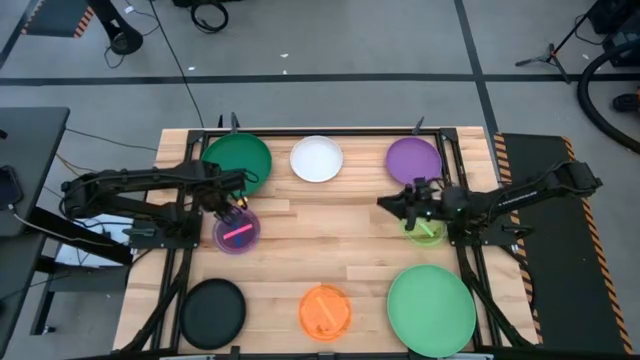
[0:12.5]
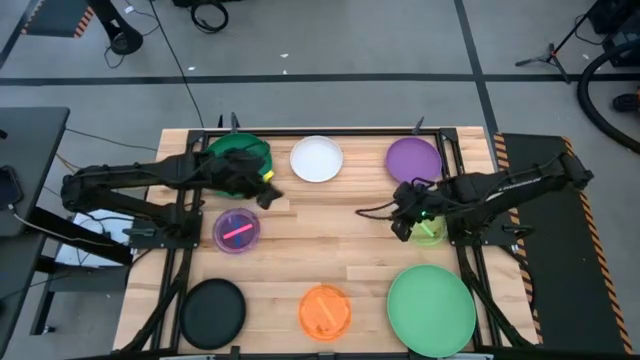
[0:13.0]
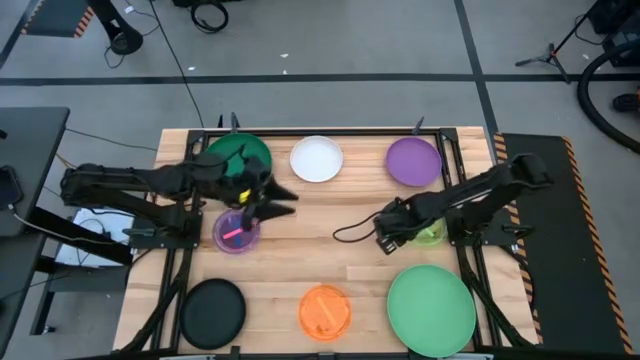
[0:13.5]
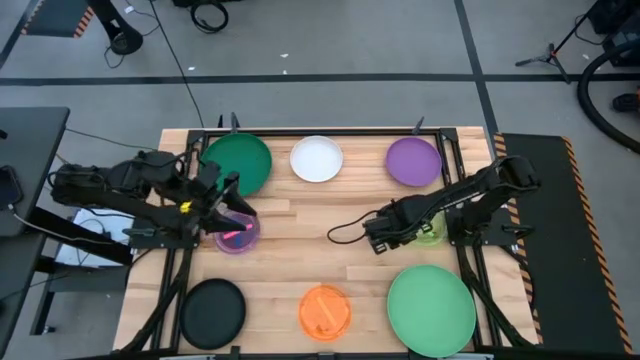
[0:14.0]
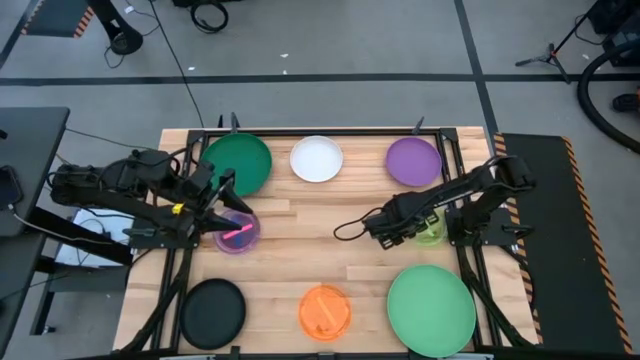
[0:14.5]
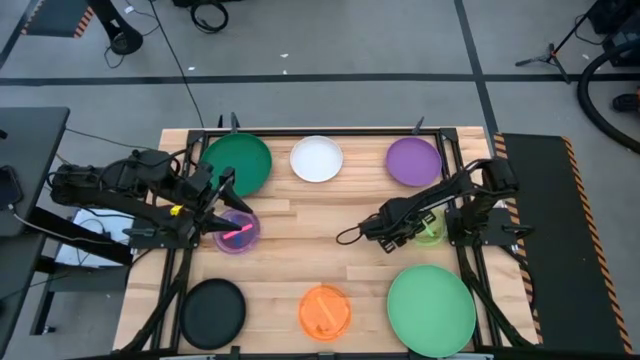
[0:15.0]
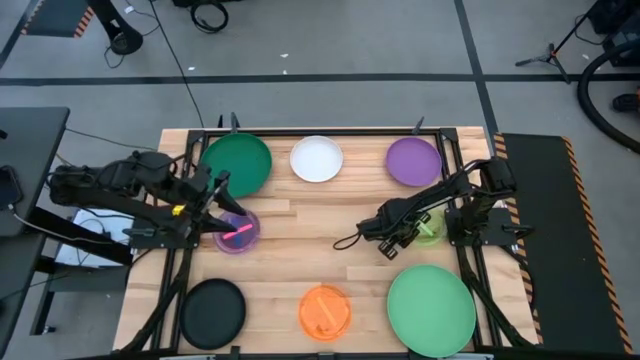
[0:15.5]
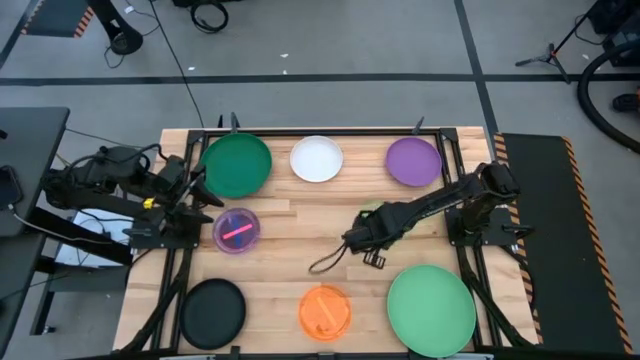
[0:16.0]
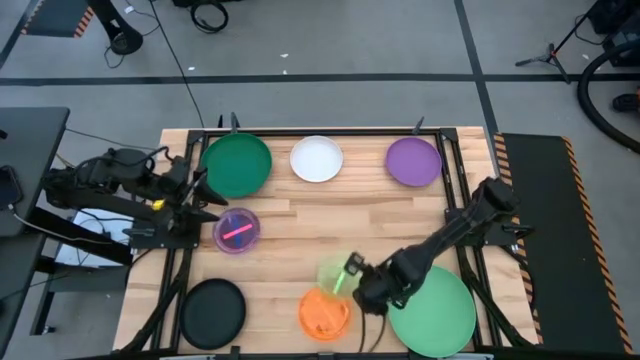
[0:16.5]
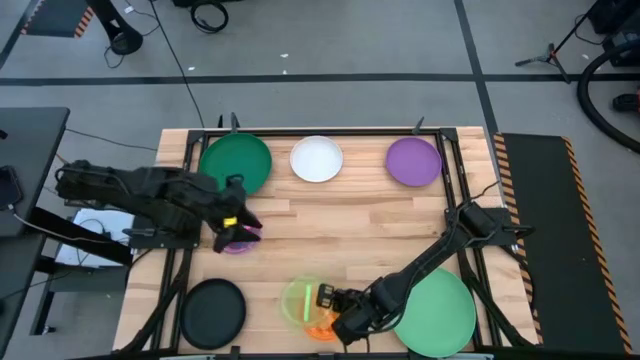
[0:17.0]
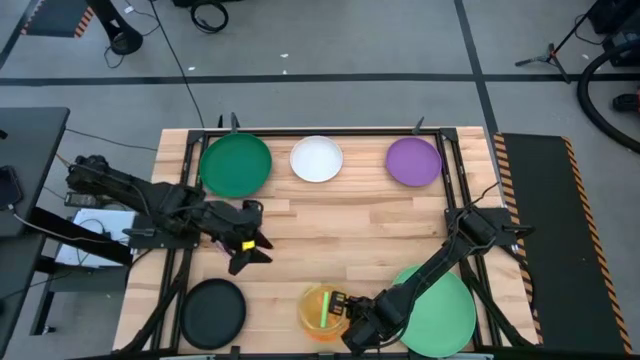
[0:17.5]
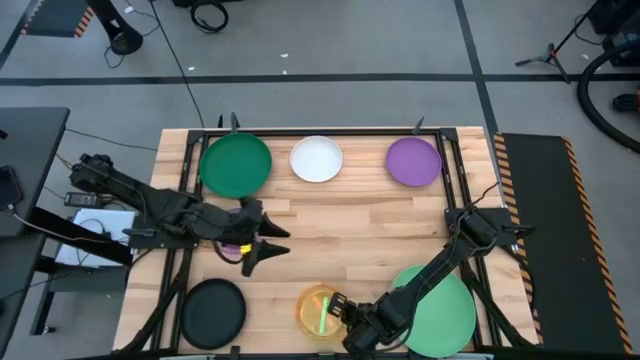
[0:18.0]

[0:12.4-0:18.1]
Task: Stack plastic plates
Stack the transparent green plate on top of the transparent orange plate

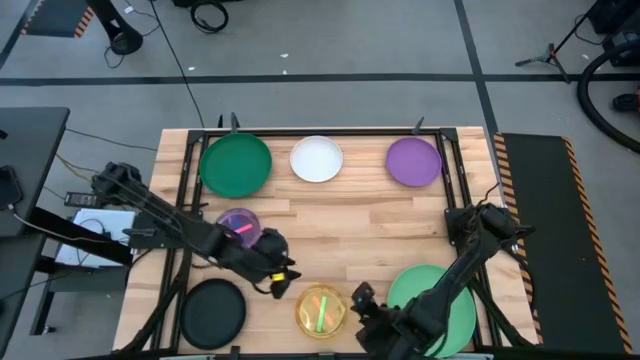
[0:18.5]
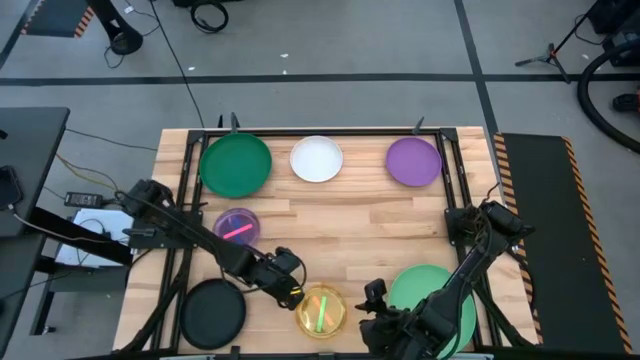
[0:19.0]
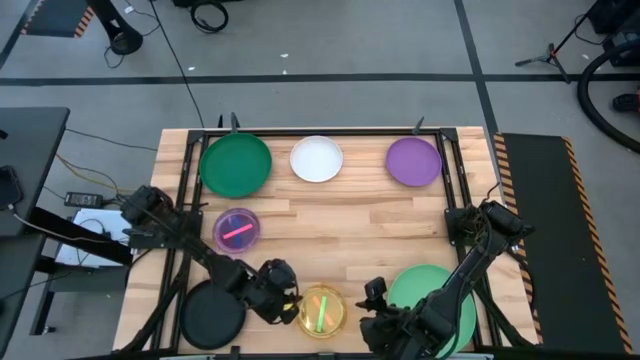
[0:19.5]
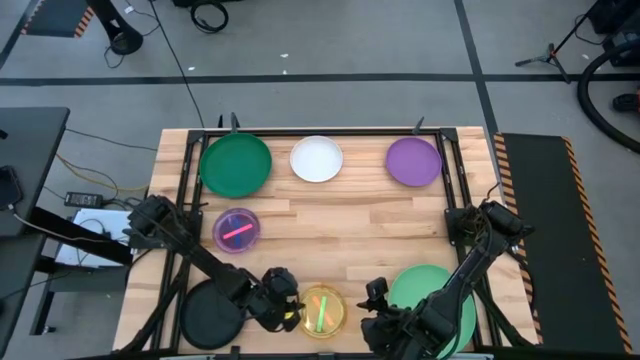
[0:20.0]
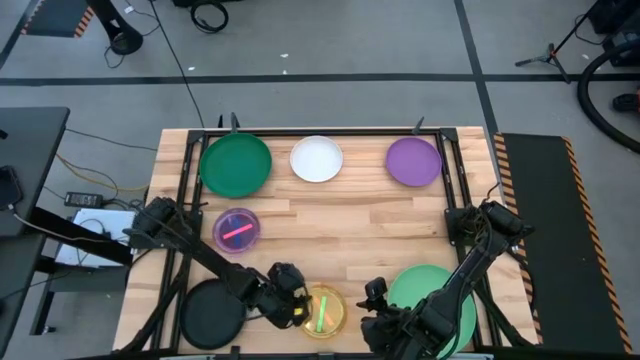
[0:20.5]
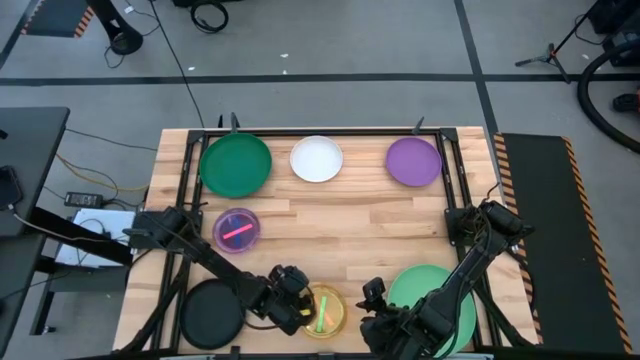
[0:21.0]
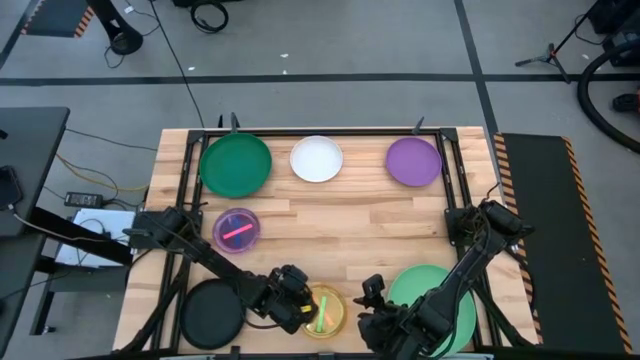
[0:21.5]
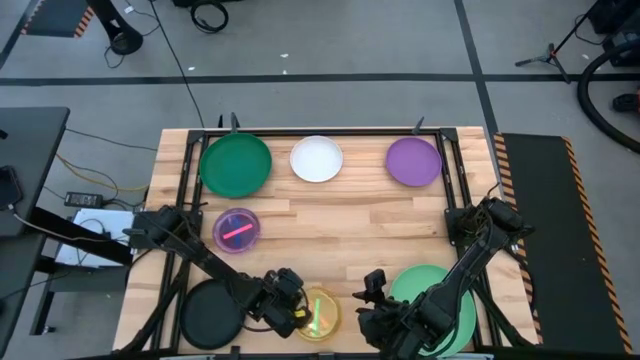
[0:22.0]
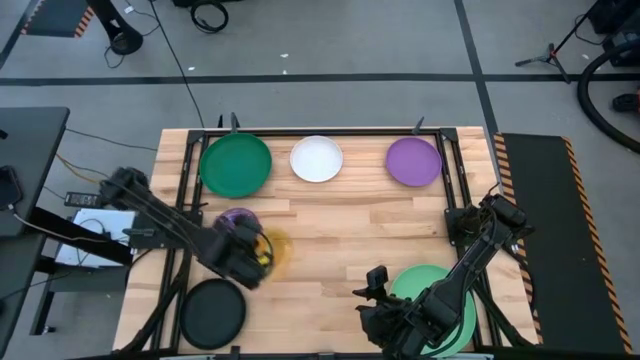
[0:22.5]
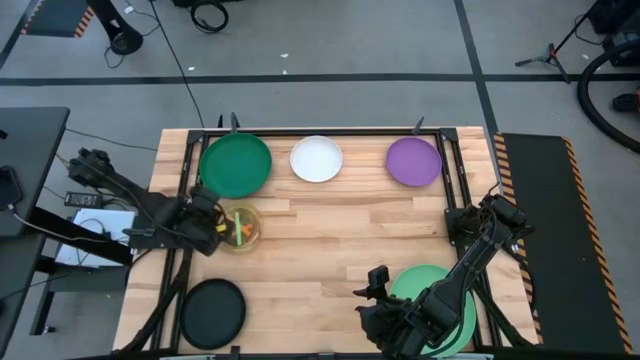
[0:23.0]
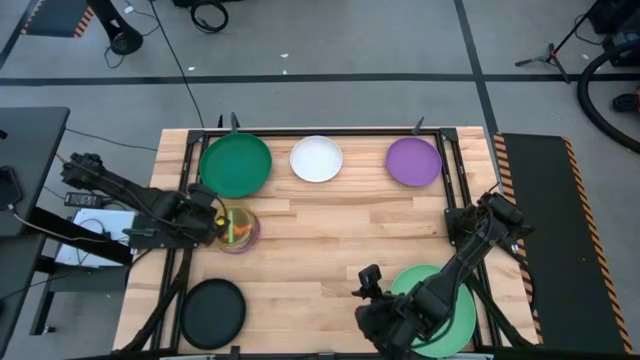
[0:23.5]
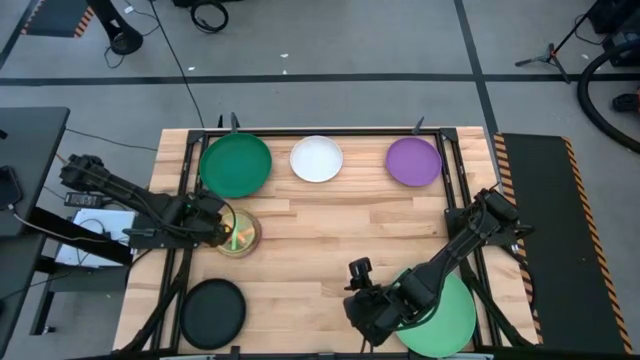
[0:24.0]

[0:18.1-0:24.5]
Stack the bottom stacked plates on top of the transparent red plate

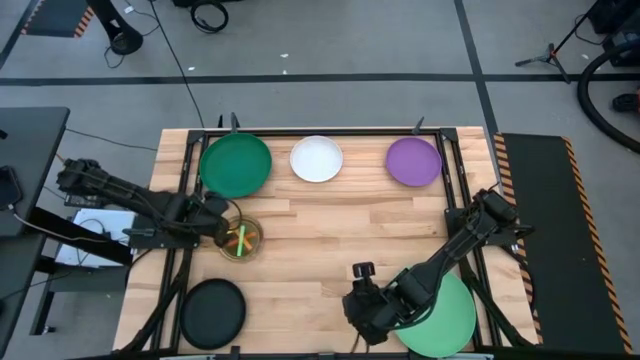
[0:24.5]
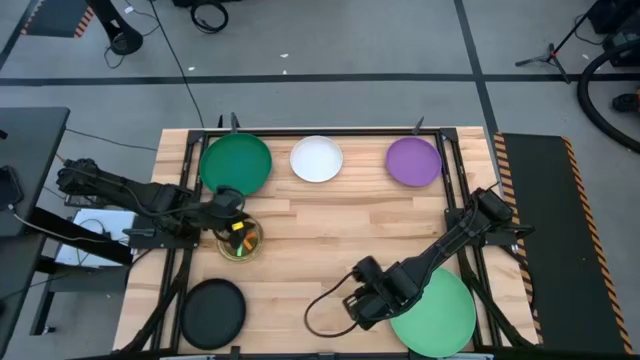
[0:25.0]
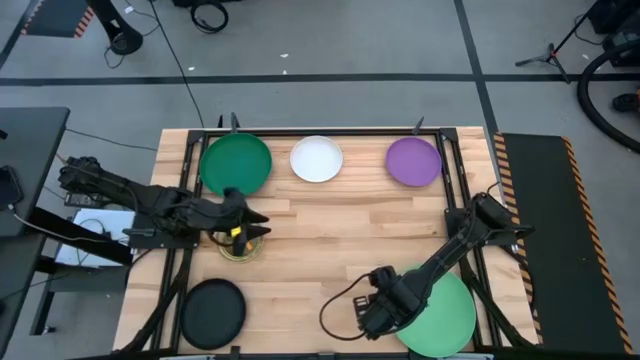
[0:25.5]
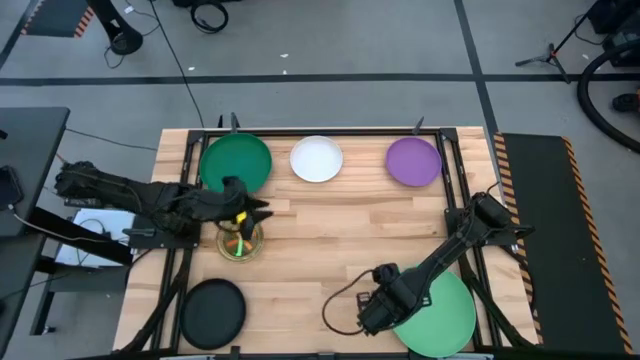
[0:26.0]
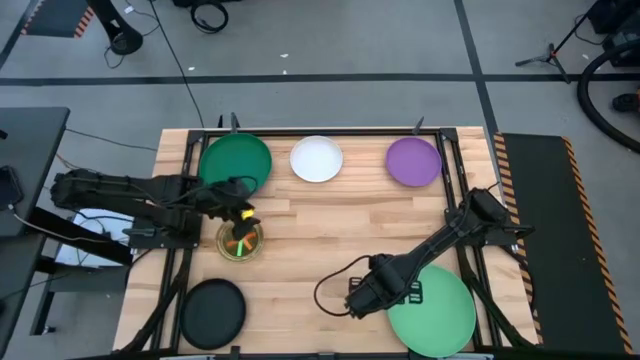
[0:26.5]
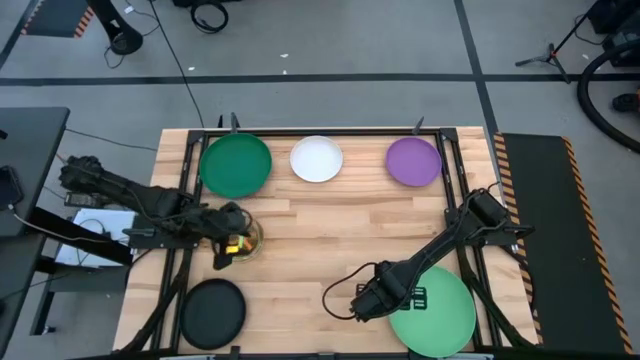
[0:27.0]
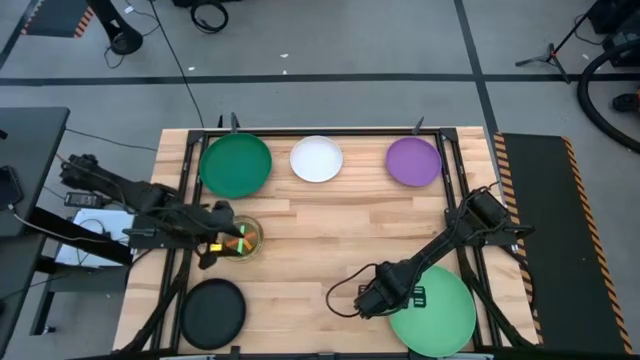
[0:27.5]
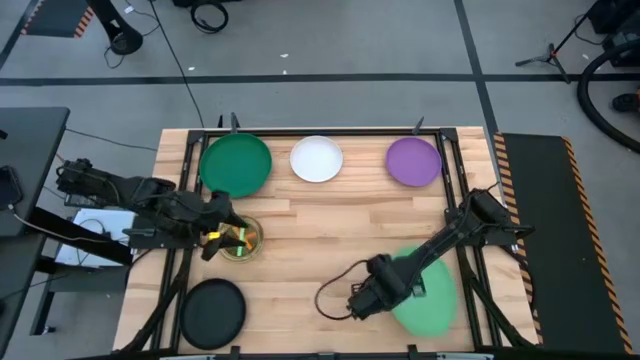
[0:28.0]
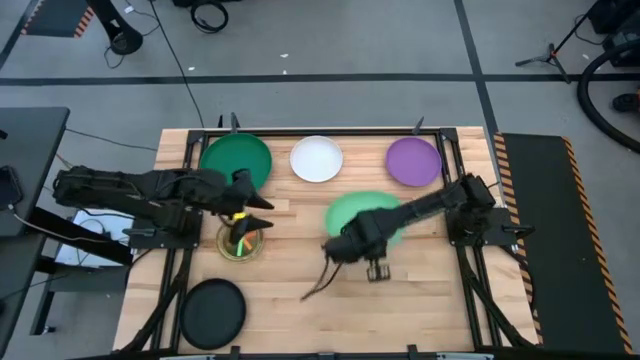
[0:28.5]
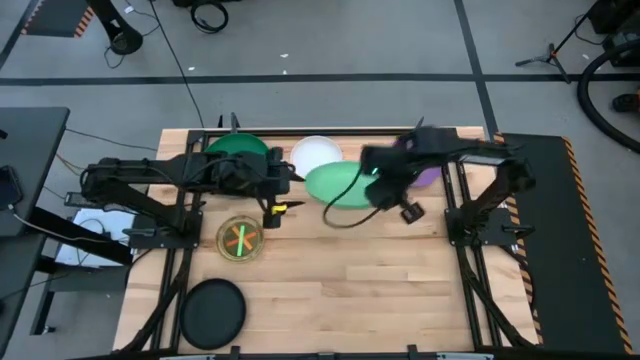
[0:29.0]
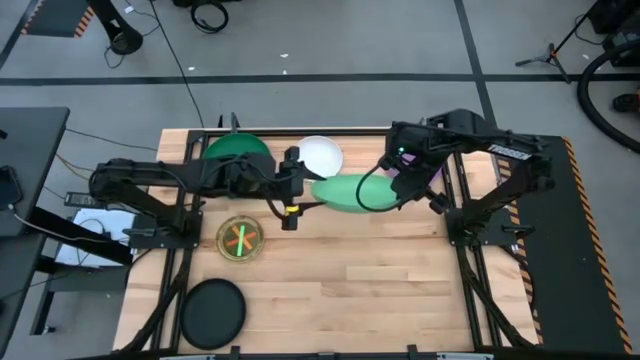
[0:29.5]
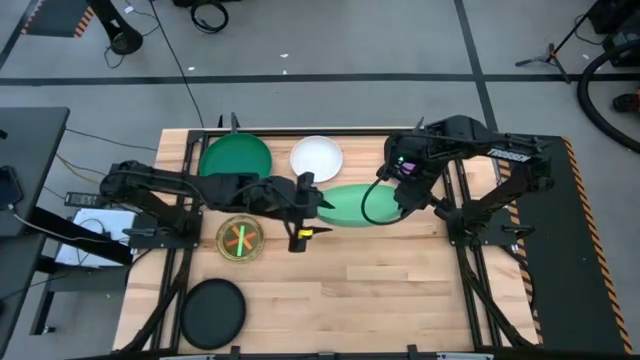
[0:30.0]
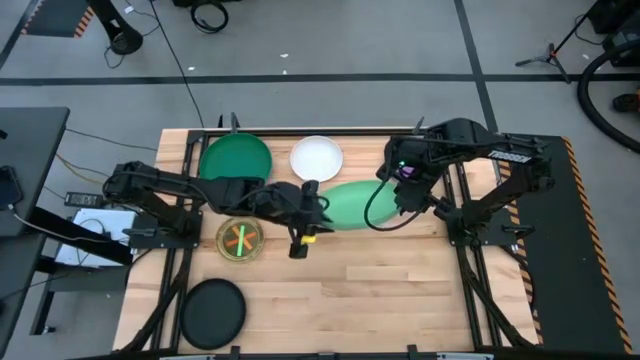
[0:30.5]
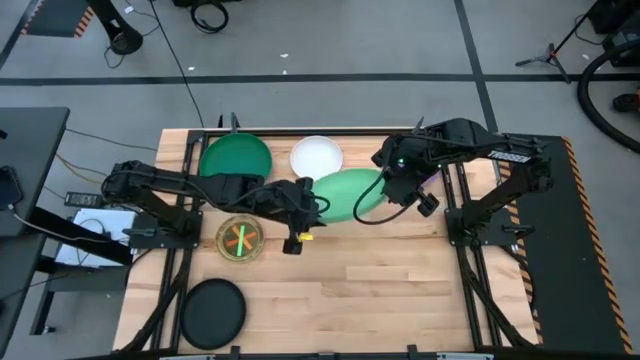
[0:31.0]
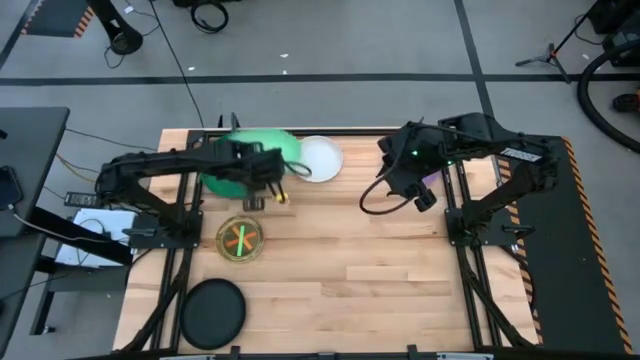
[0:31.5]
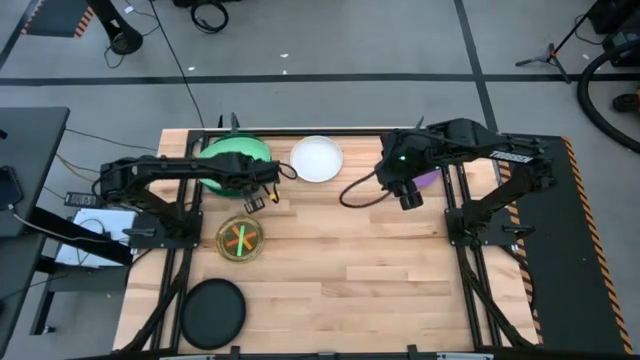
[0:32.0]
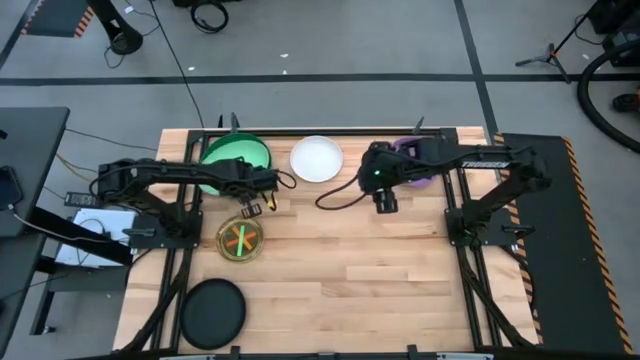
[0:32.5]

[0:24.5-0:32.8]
Stack the light green plate on top of the green plate

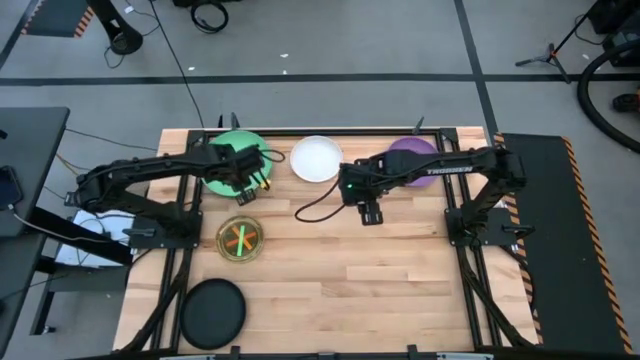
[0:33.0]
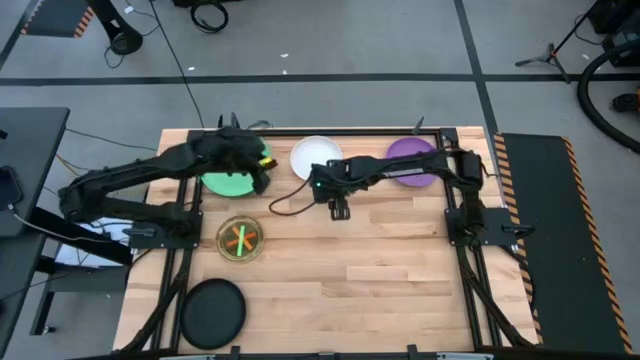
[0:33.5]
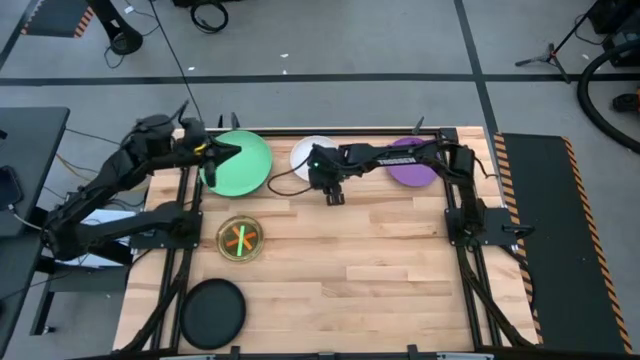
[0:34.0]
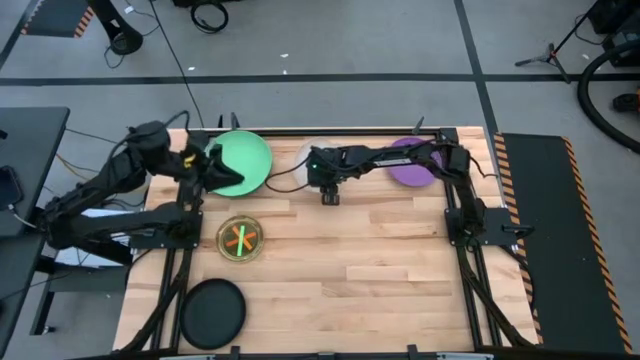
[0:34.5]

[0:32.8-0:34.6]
Adjust the white plate on the table
